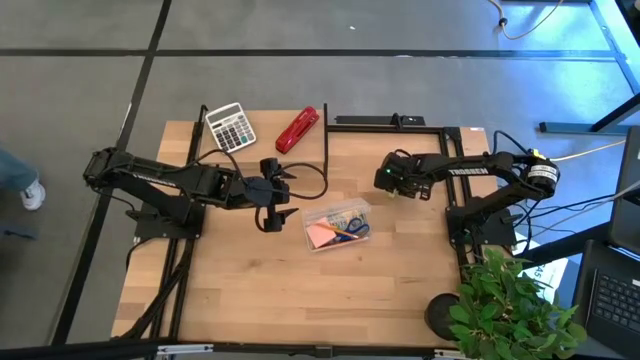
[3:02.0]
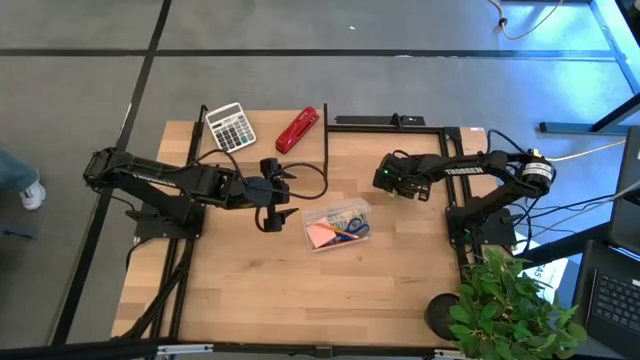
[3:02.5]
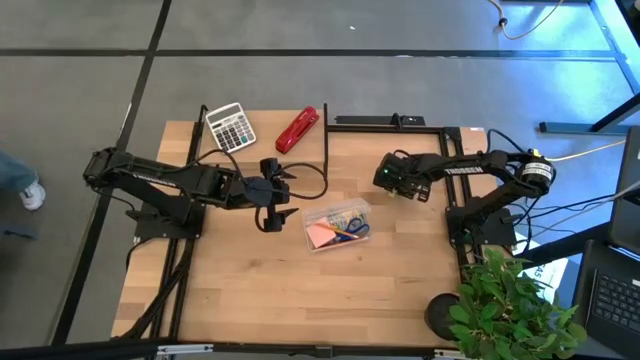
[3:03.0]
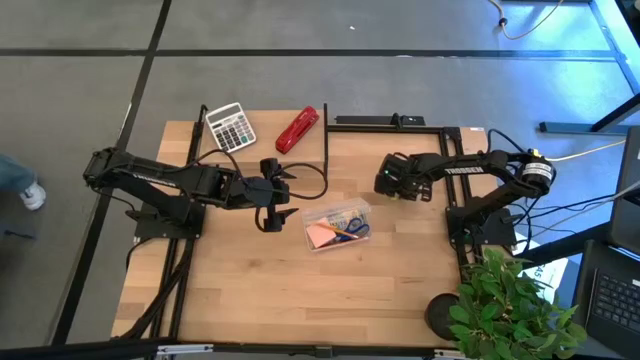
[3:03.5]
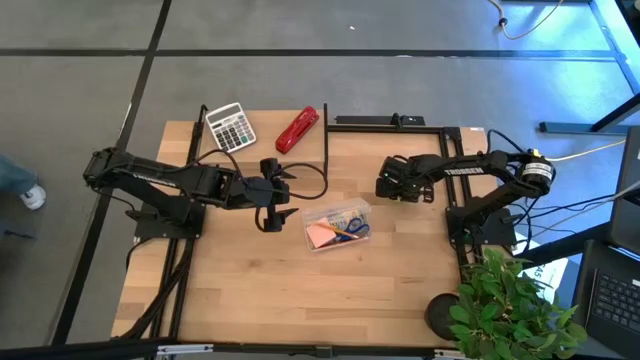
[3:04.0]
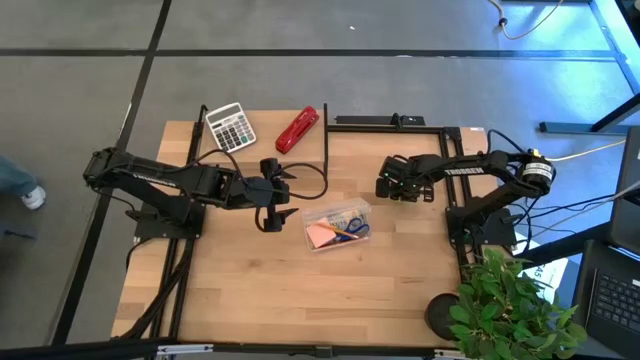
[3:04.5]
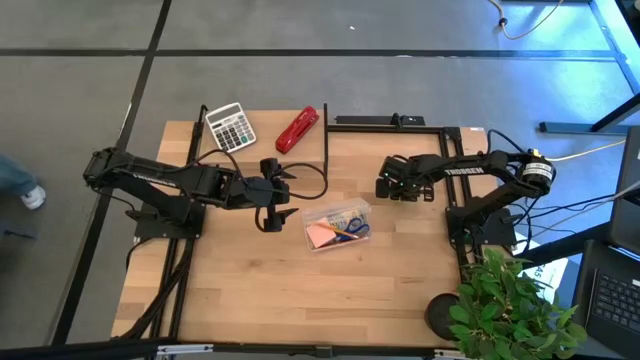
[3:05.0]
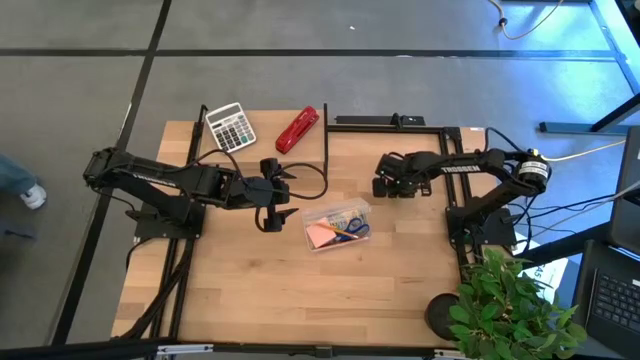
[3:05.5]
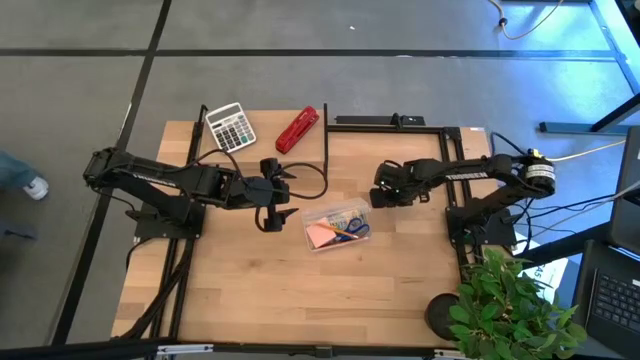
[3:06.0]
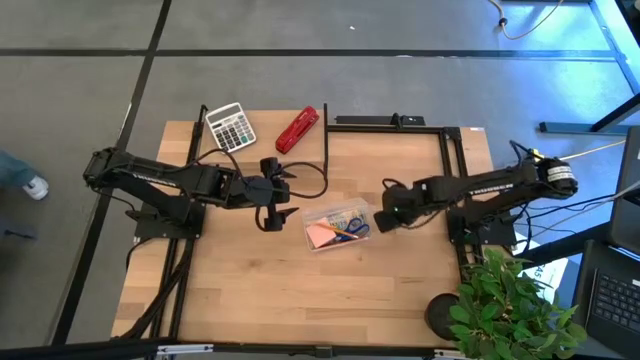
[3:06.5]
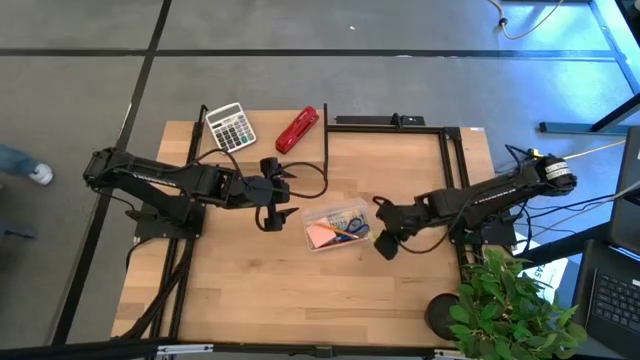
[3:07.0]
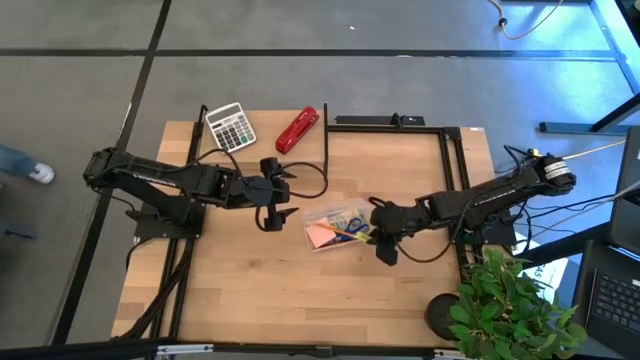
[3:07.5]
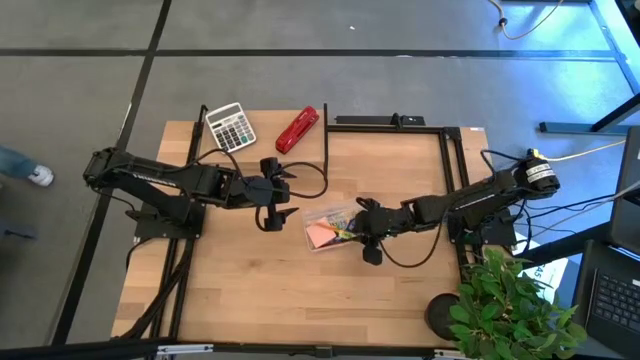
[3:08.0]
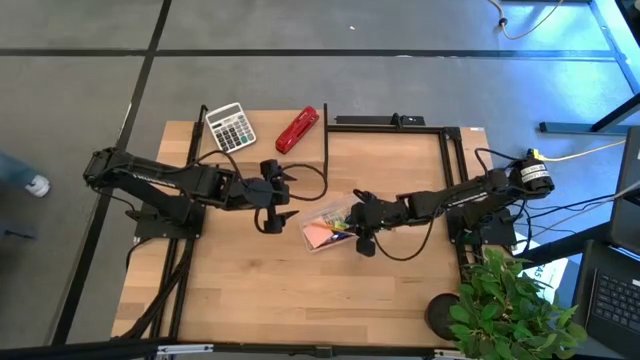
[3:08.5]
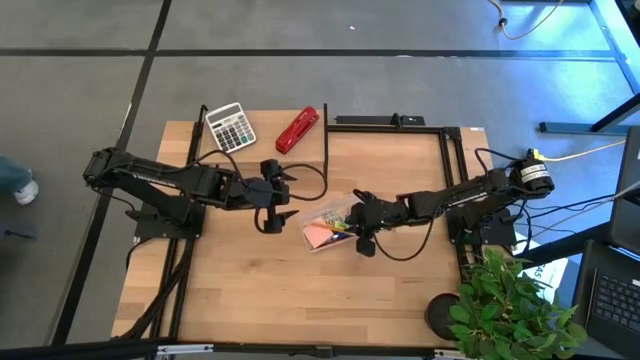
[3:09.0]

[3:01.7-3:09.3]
Task: Pack school essentials
Put the yellow eraser into the transparent supply box

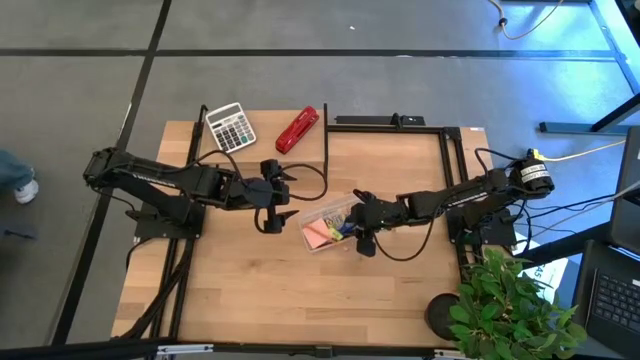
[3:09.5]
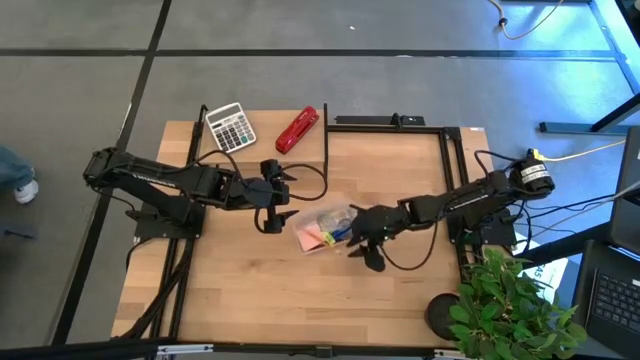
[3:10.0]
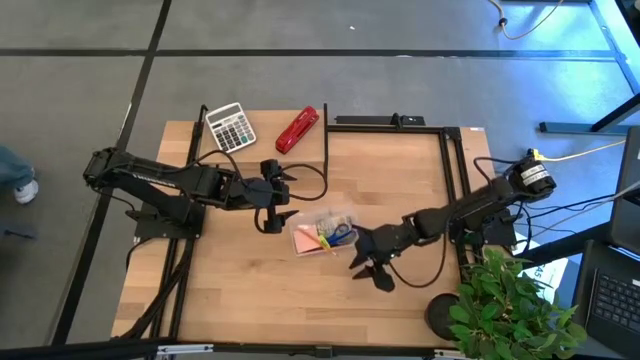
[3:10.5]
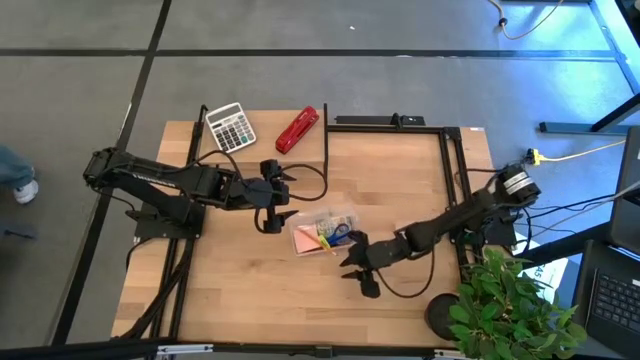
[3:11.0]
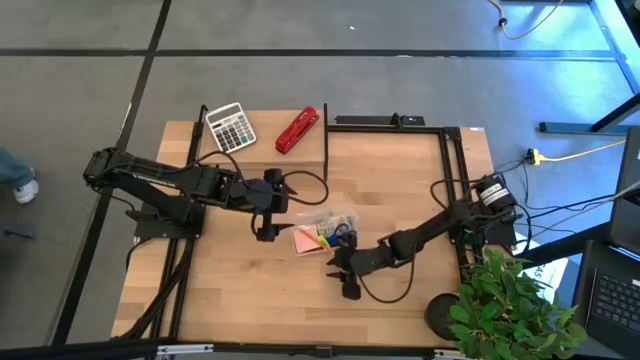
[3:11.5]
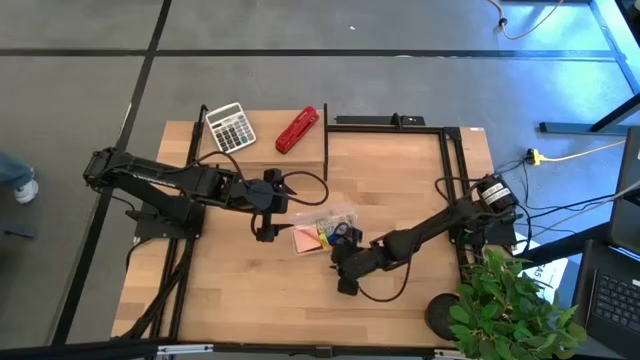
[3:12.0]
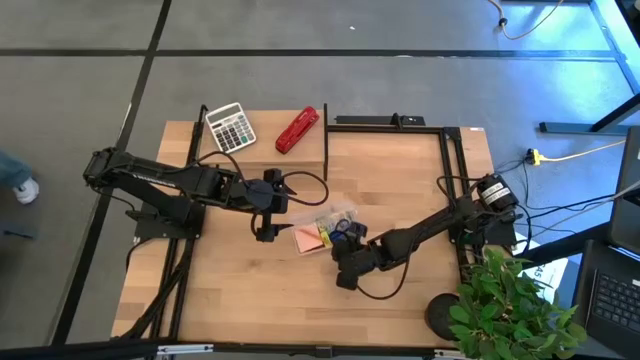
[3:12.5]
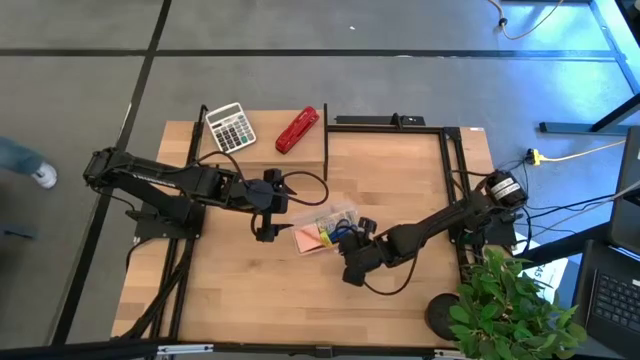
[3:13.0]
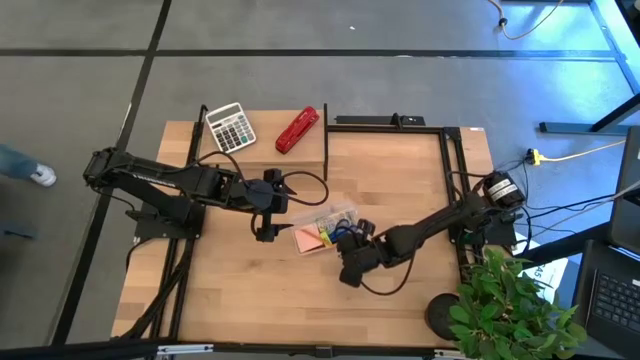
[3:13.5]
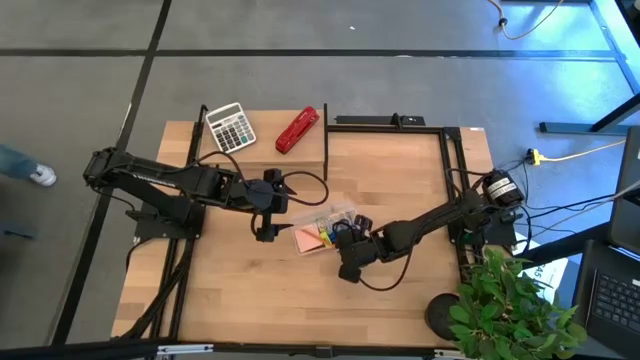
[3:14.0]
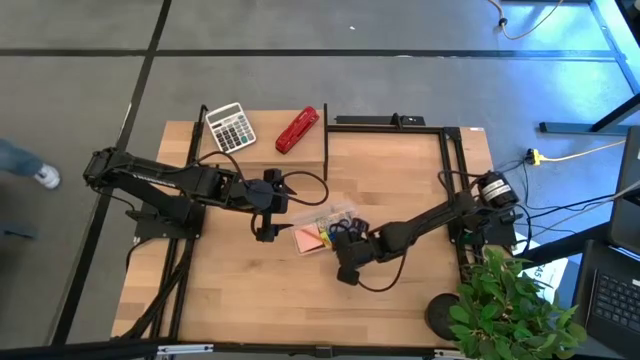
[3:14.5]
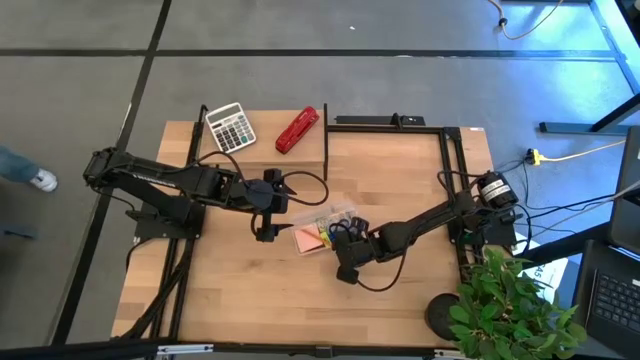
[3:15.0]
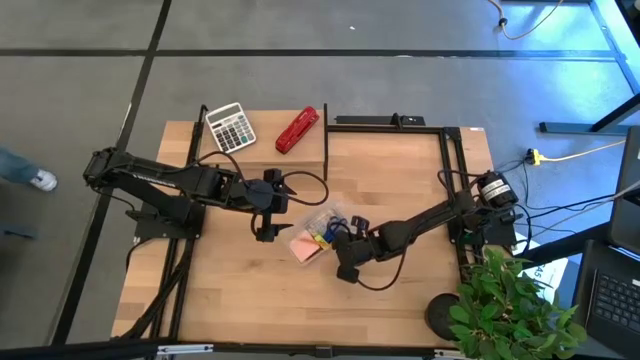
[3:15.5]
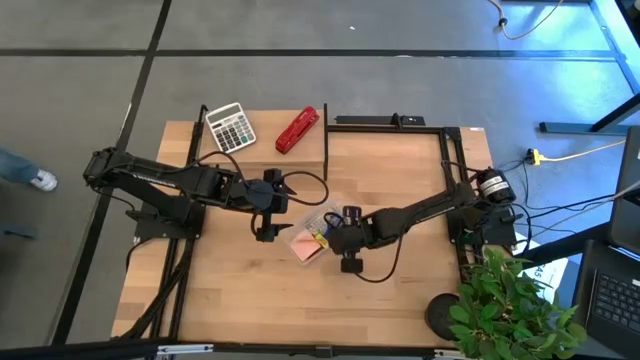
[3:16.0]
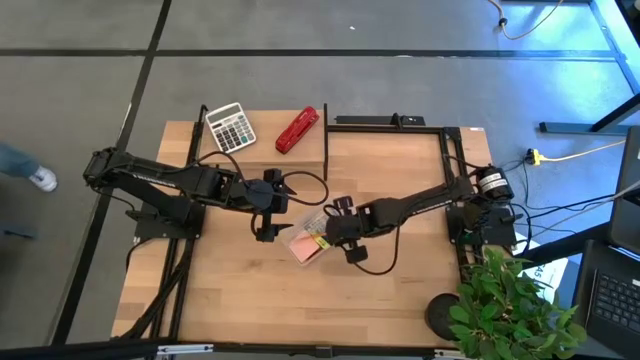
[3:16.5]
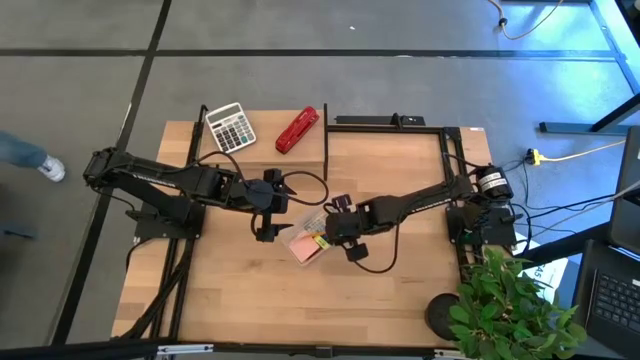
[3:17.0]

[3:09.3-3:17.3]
Adjust the orange pencil in the transparent supply box

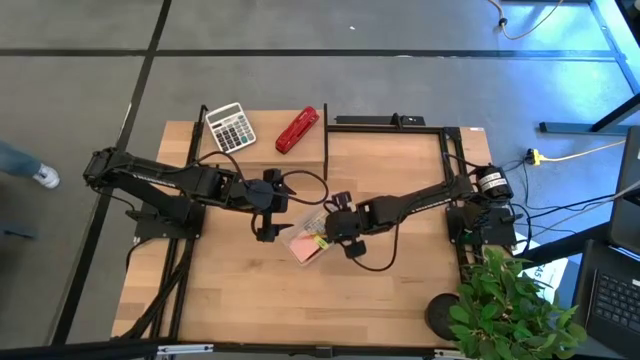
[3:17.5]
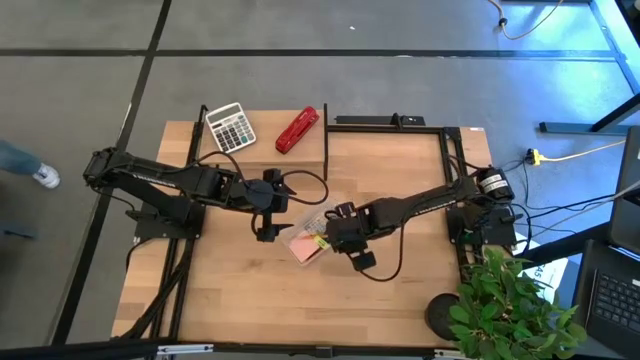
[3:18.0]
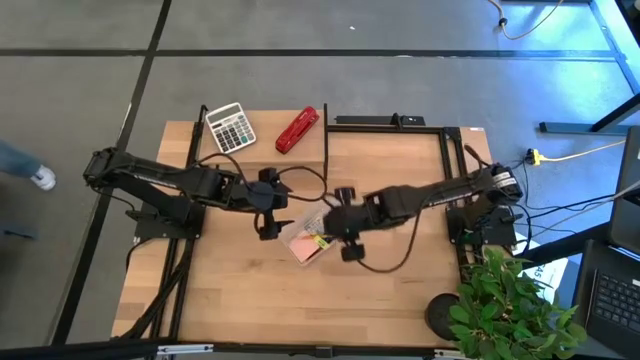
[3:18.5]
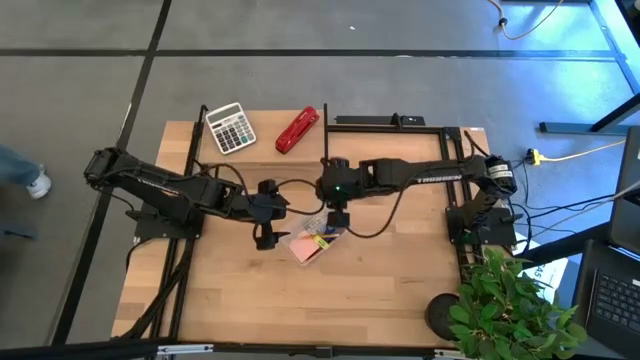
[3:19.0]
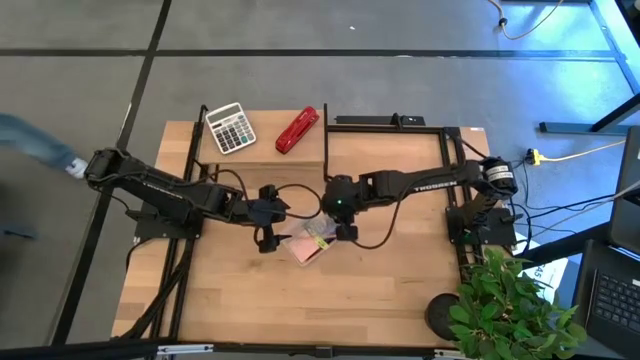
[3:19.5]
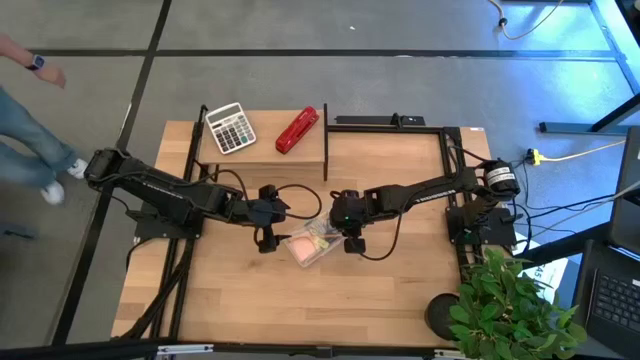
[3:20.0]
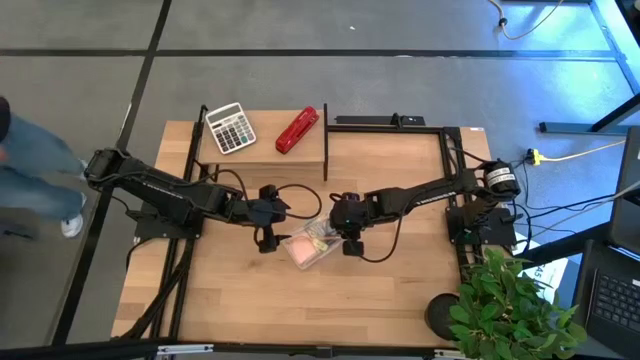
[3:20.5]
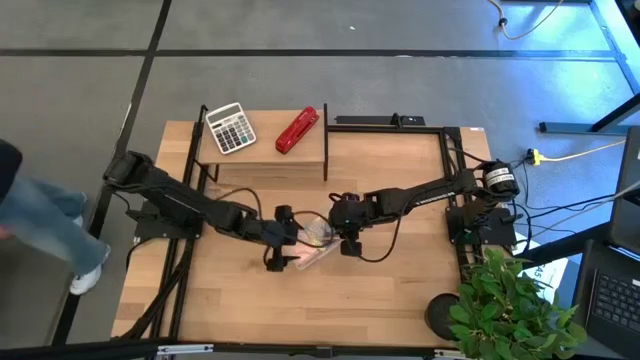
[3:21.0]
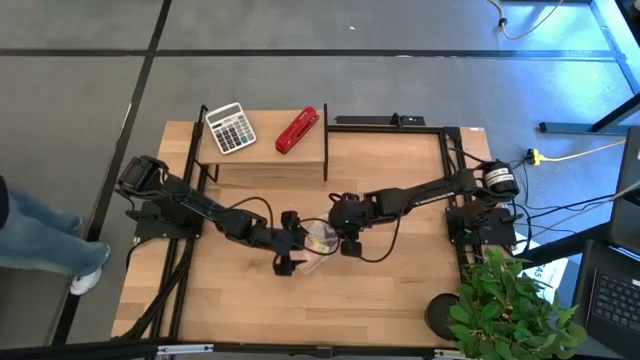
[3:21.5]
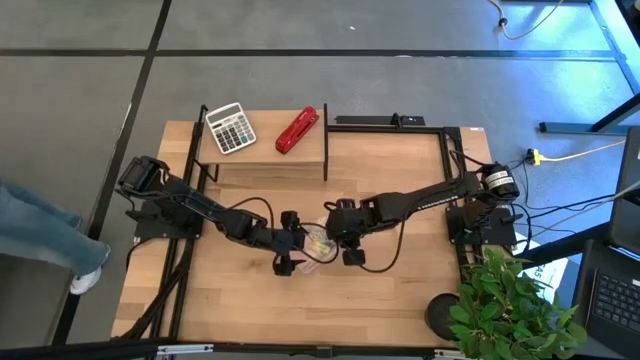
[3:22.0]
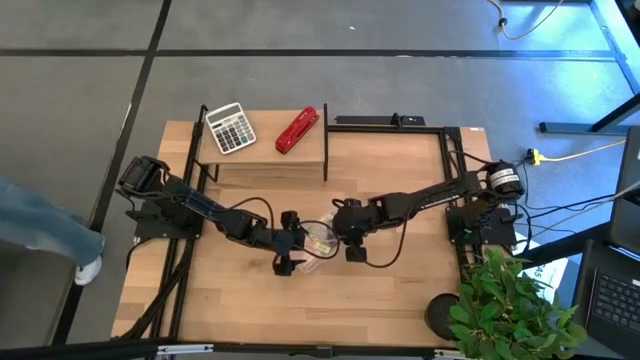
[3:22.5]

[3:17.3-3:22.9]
Close the transparent supply box
